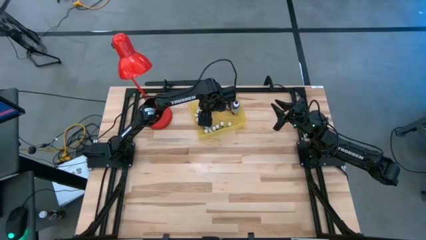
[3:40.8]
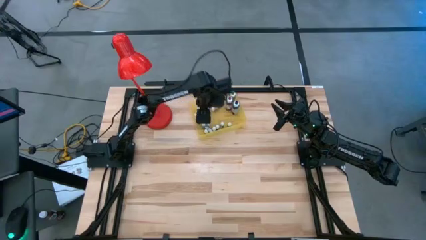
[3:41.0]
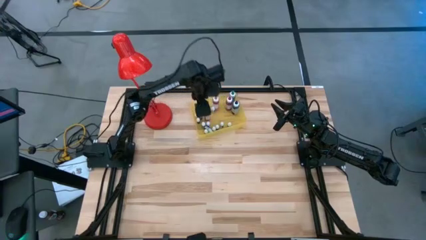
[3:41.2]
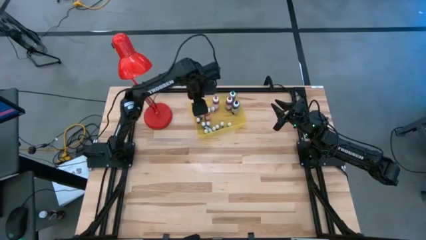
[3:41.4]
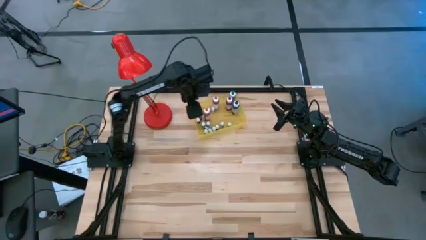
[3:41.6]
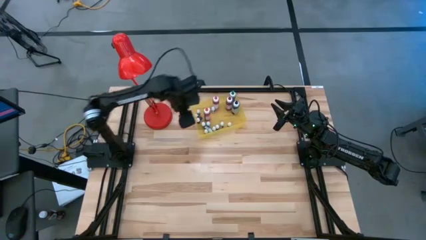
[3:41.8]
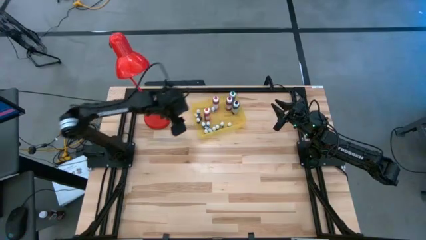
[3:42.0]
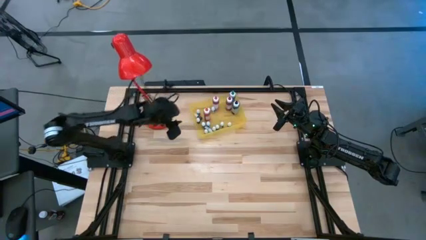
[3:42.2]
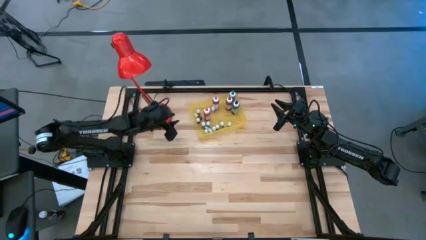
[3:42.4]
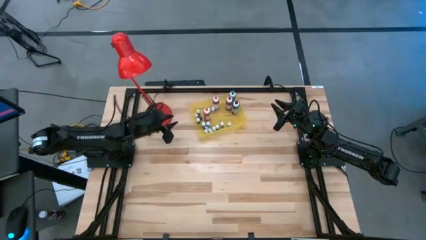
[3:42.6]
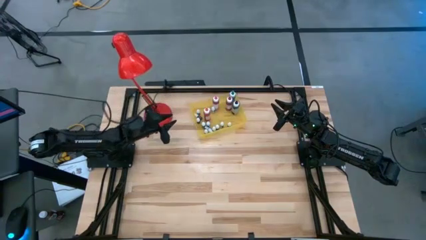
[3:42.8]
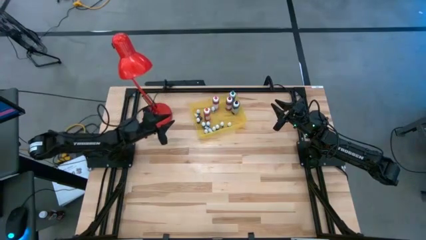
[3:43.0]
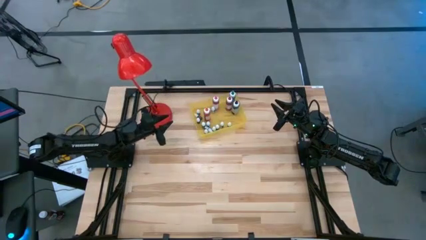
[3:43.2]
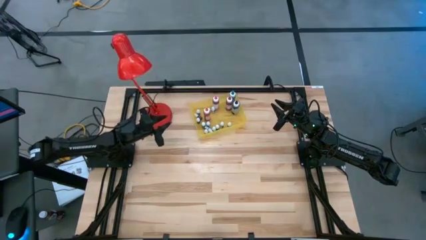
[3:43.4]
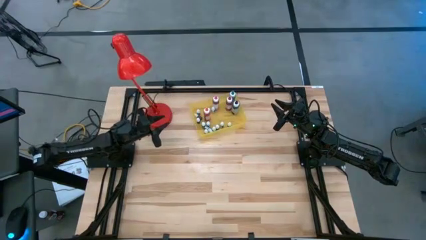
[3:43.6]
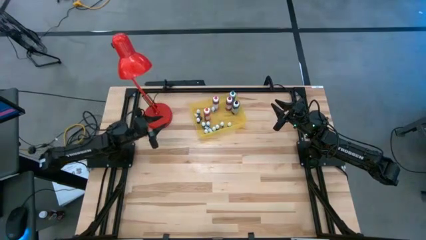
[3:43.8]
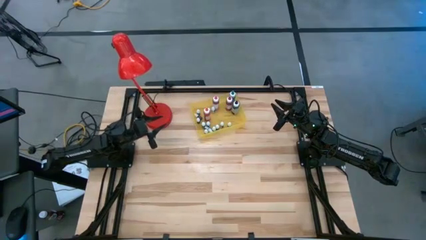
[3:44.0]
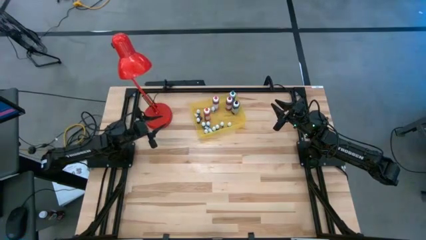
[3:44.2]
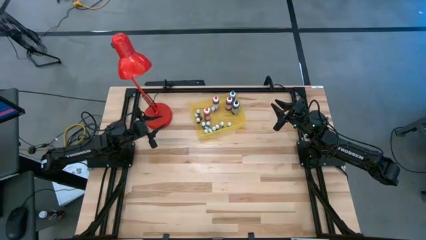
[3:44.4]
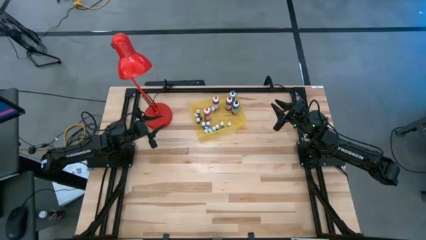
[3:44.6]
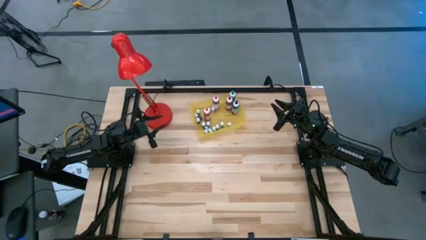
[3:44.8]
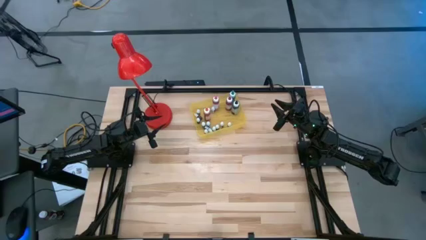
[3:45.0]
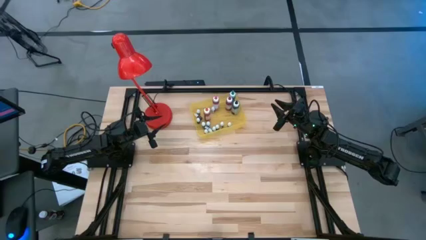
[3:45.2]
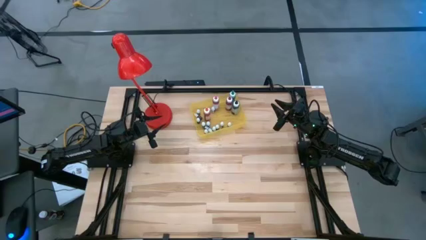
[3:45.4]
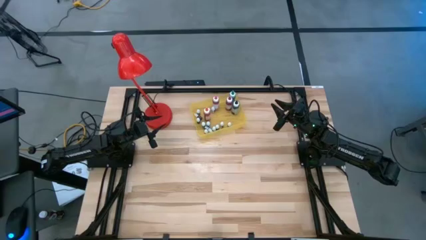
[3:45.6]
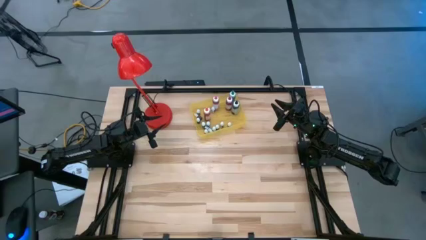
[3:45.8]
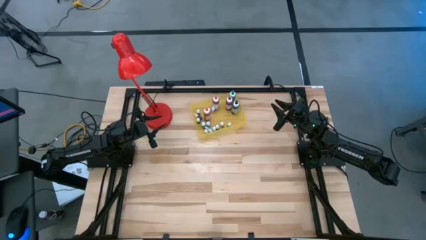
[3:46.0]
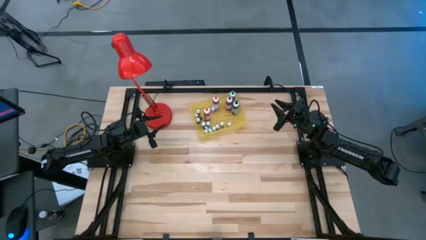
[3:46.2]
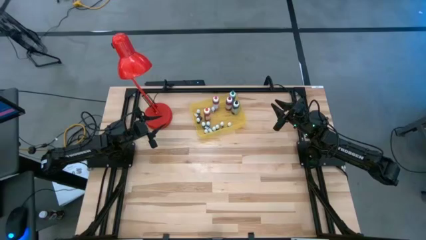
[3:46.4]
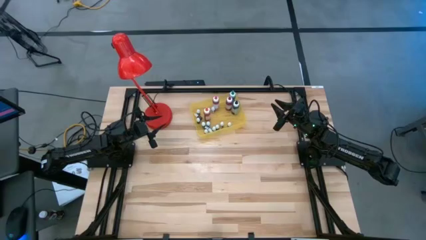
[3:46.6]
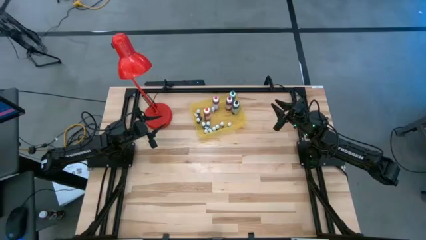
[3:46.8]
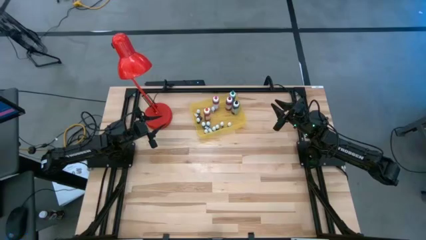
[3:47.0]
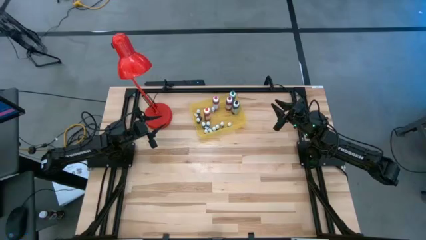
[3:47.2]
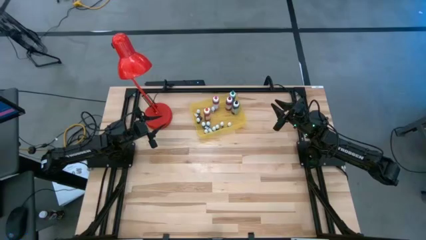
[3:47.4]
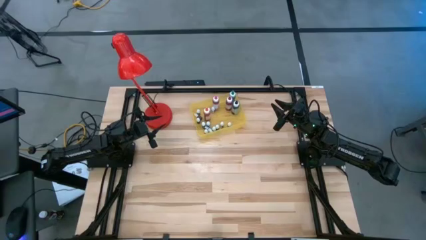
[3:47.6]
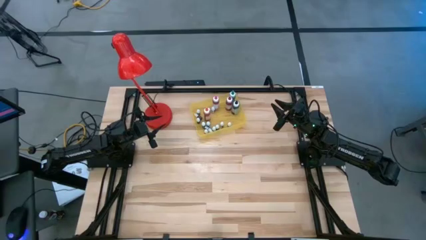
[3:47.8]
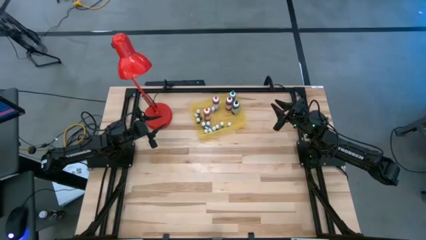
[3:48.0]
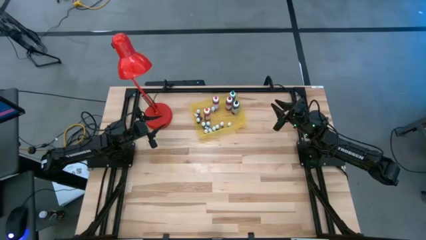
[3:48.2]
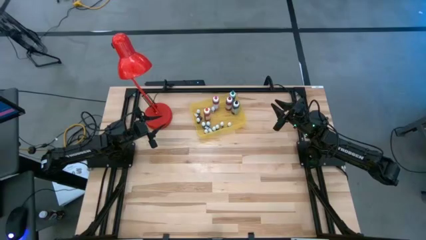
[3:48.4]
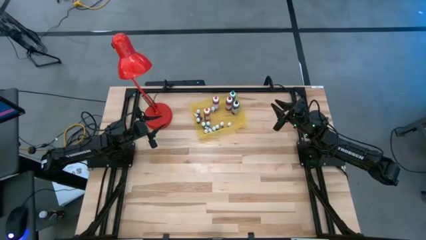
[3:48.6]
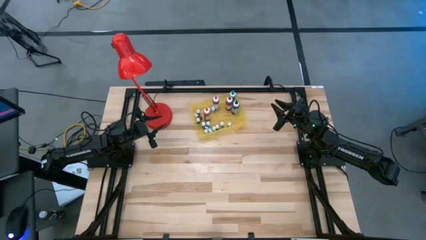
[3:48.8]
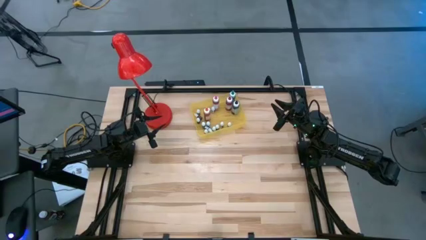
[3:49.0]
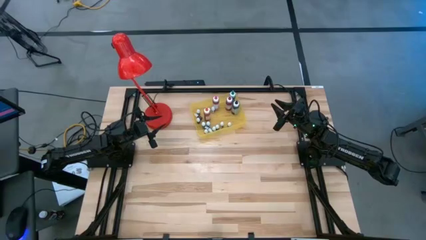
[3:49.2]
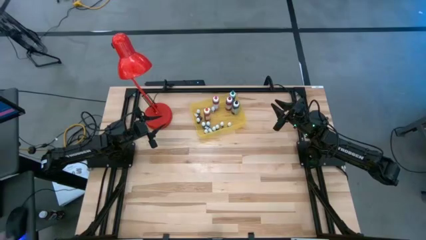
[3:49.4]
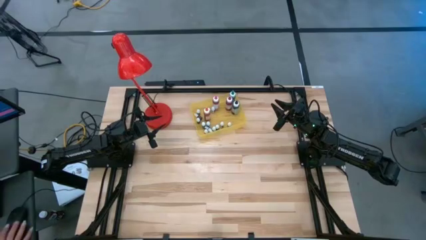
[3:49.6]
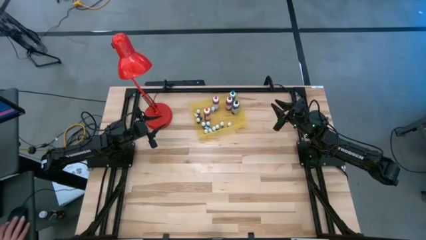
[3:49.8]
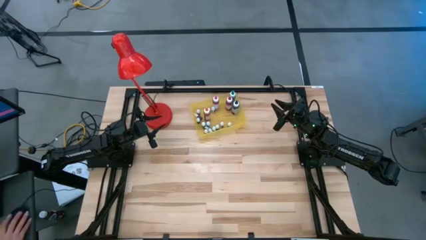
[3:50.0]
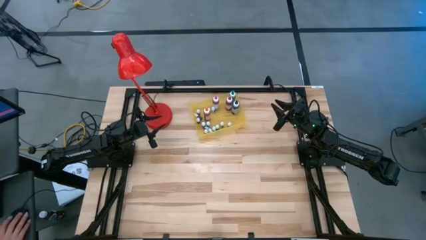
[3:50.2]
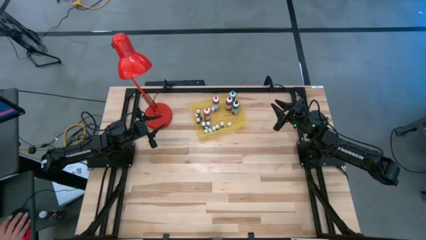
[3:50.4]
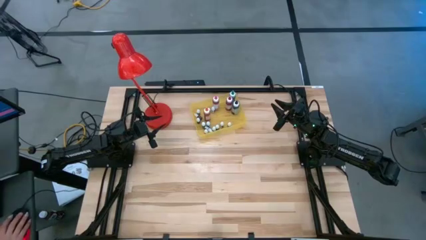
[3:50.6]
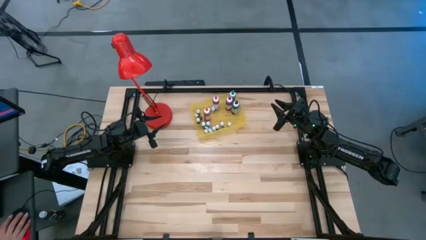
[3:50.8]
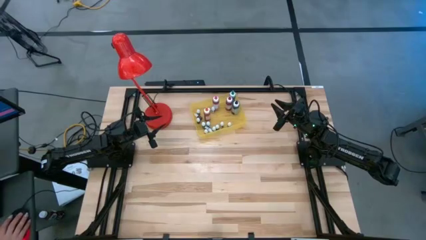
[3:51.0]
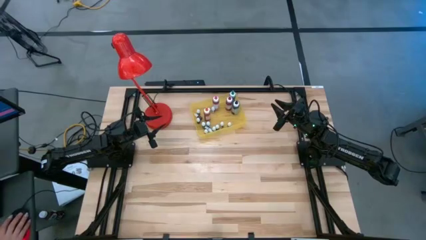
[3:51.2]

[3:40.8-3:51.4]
Task: Pick & Place food coloring
Return to Home Position
